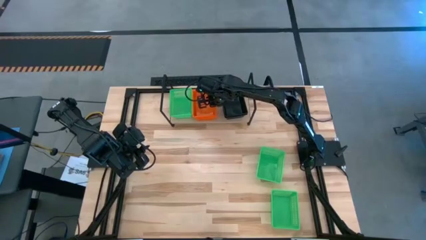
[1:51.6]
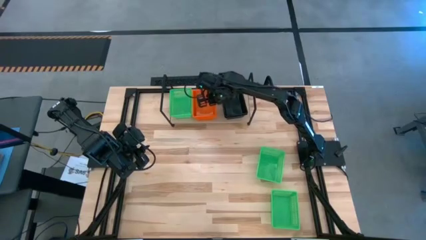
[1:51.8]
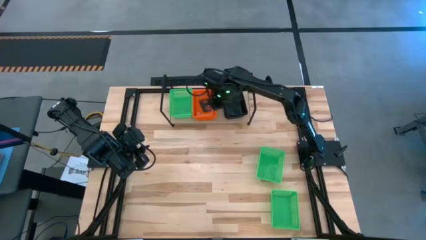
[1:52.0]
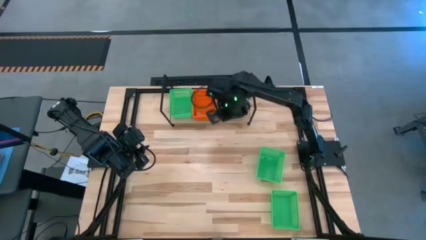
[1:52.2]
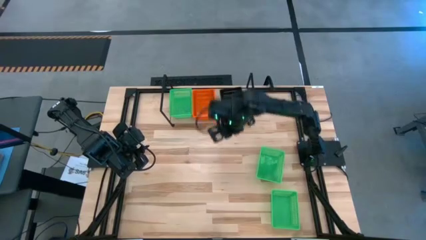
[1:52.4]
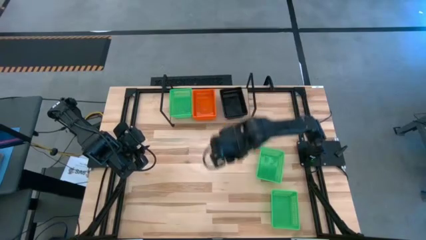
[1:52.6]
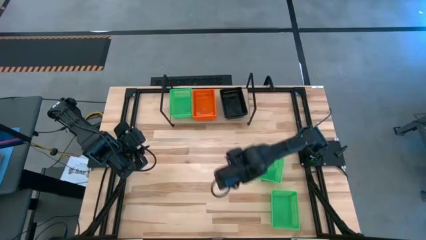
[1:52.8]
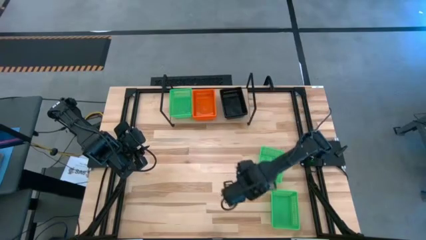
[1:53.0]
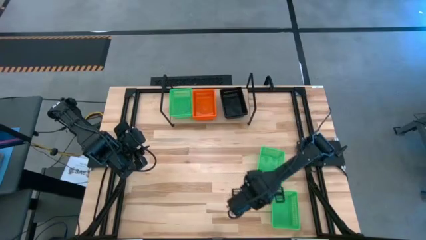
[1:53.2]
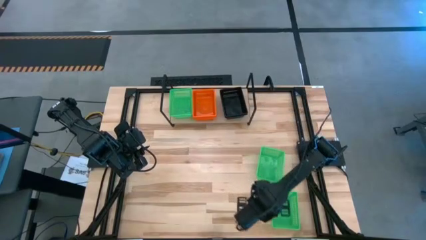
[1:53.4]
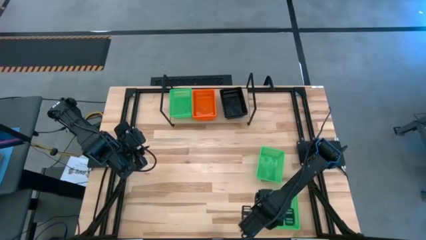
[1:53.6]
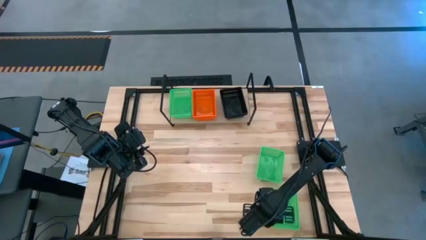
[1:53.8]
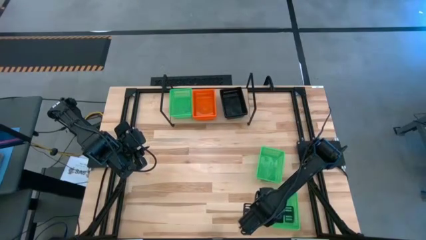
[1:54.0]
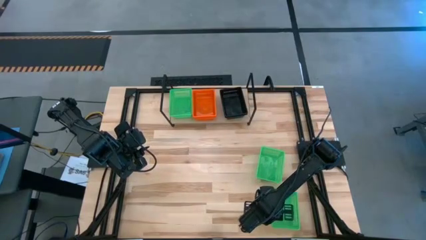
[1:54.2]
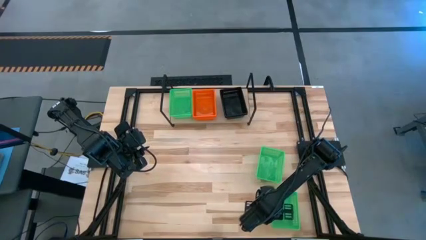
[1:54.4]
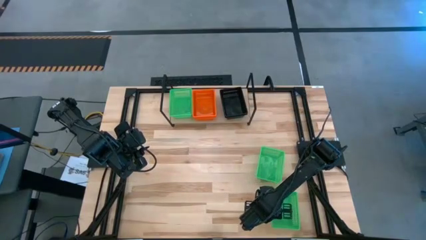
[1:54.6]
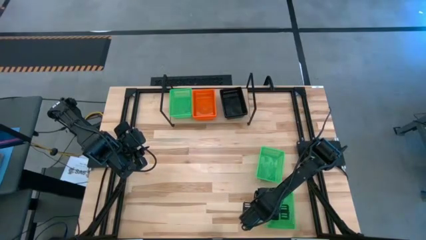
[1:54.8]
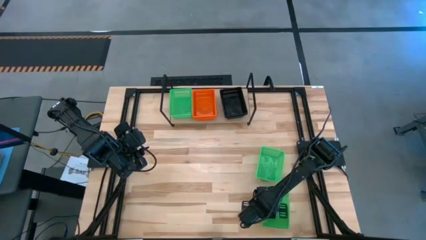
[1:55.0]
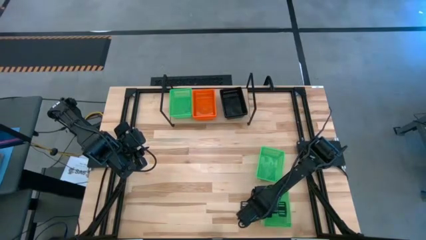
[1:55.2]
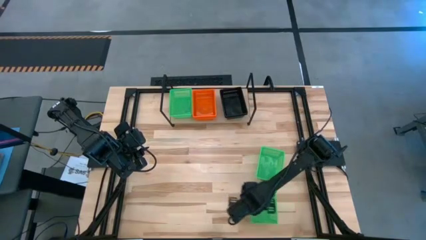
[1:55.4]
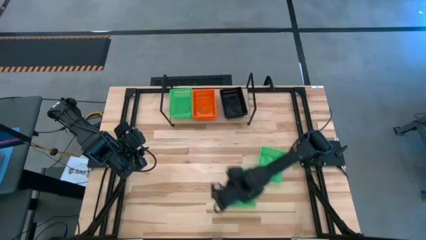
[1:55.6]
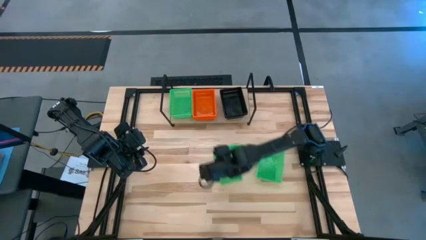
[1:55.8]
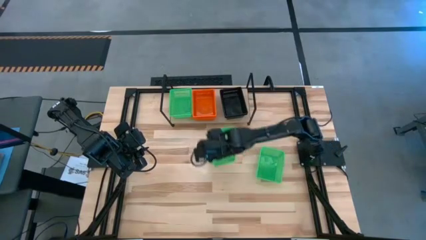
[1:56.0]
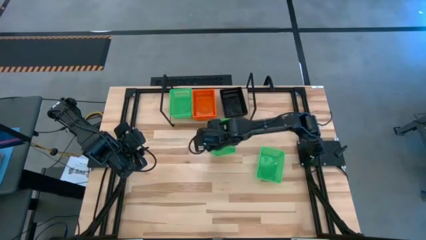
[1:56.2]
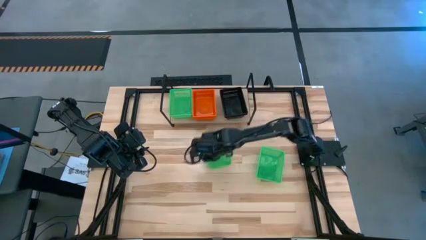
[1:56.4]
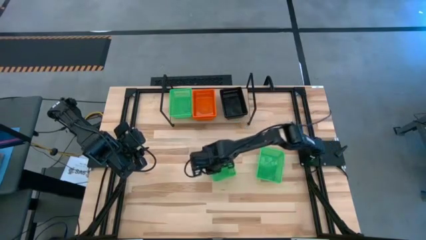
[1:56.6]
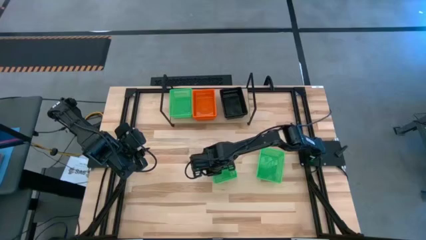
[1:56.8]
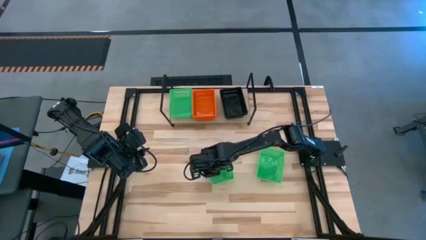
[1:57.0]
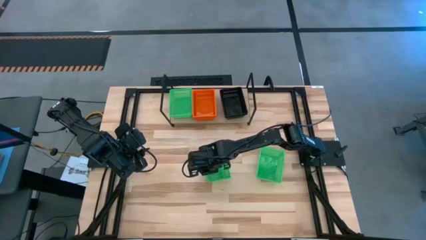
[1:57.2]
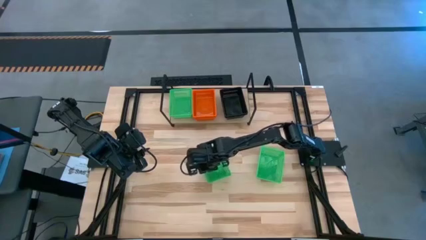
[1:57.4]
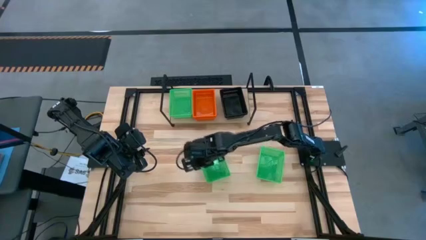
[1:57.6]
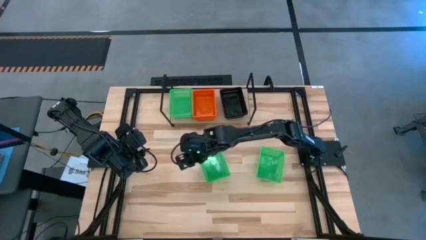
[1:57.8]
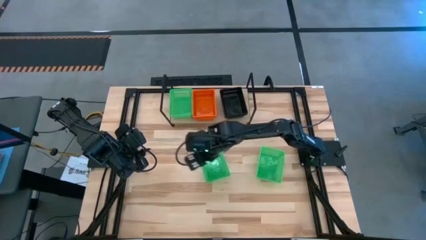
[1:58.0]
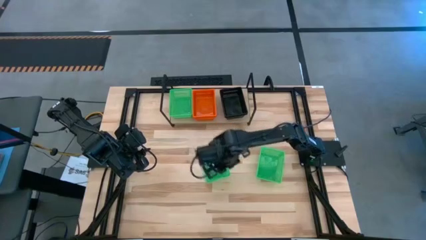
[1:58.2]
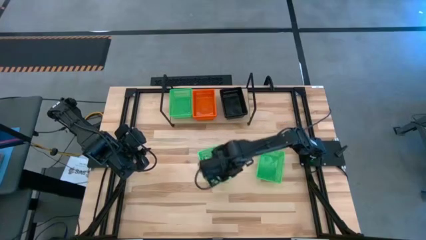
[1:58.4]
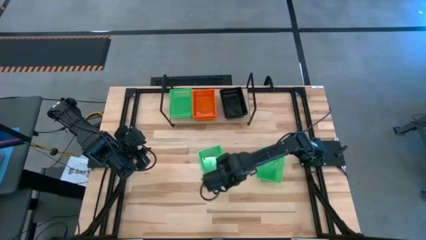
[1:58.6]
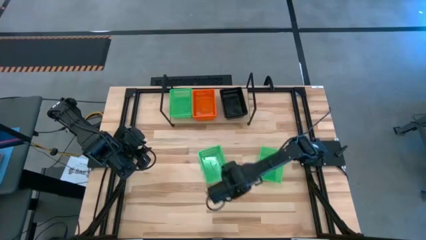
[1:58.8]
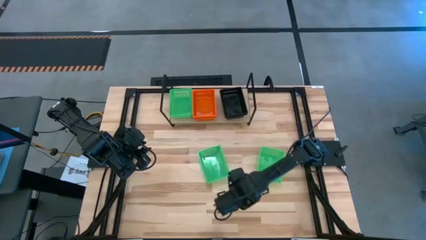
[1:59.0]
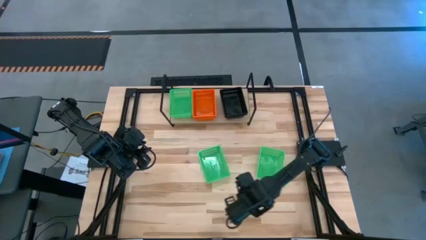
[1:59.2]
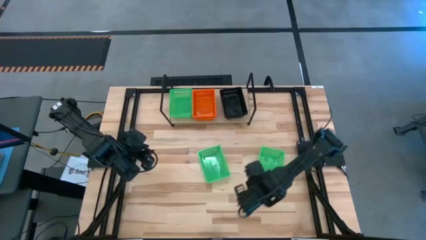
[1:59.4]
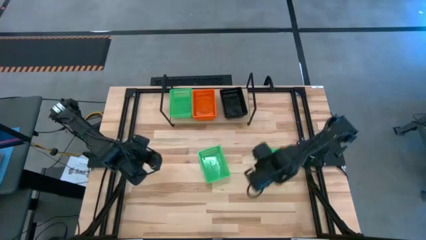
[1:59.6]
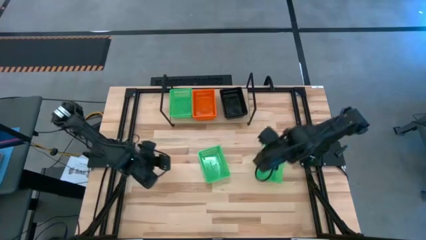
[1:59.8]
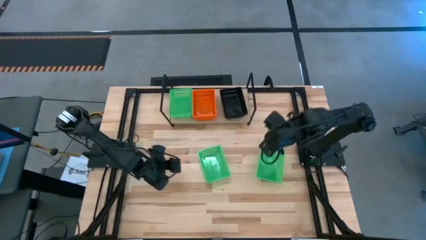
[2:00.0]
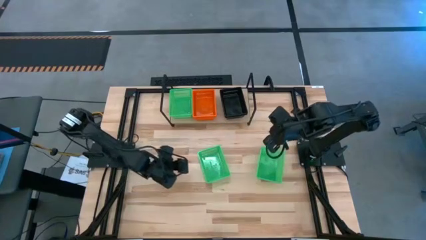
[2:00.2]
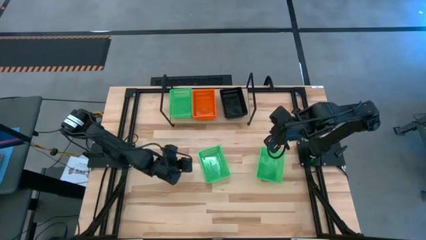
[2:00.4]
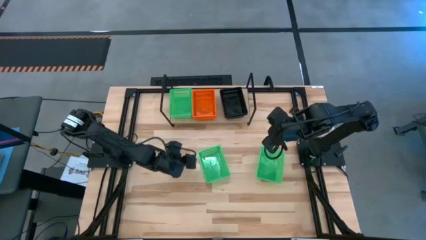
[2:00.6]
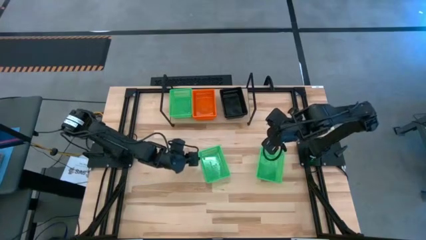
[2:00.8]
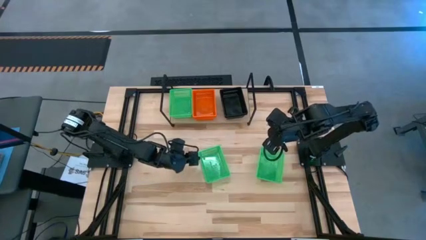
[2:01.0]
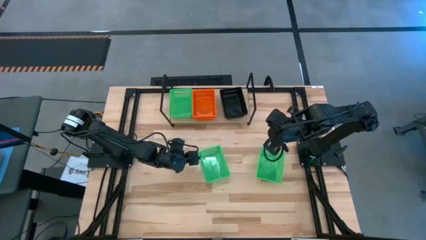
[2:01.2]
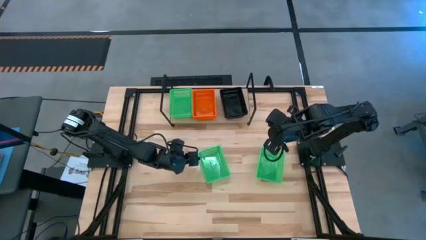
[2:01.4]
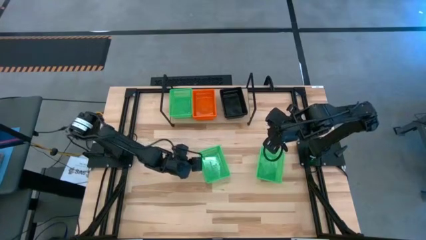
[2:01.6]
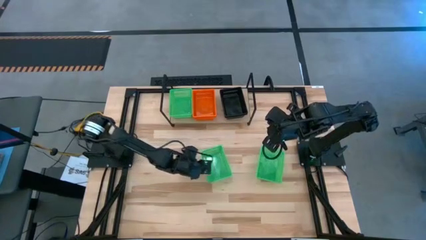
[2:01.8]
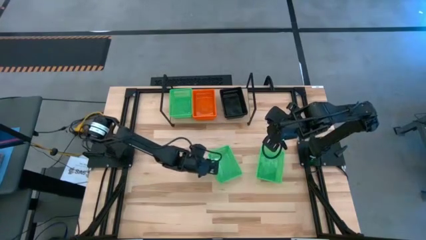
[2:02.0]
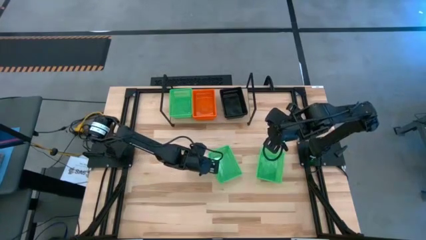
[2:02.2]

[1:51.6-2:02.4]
Task: Stack baskets on shelf by color
Stack the bottom green bin on top of the green bin on the shelf

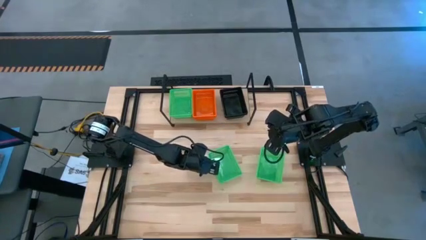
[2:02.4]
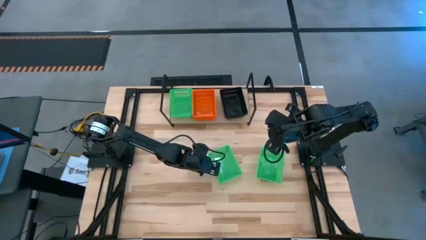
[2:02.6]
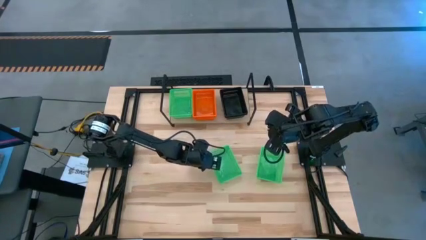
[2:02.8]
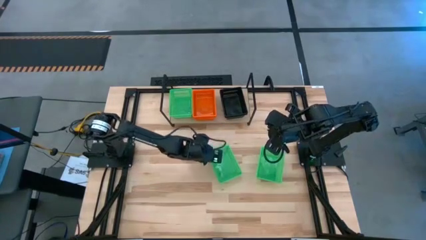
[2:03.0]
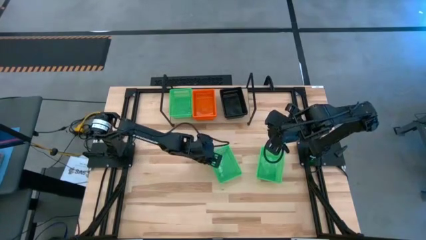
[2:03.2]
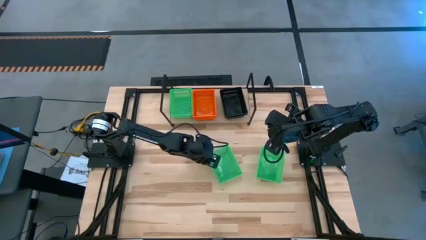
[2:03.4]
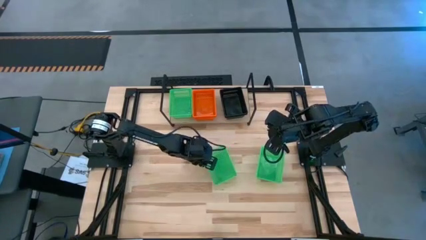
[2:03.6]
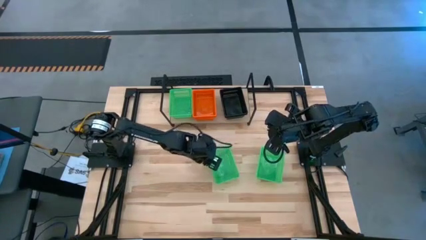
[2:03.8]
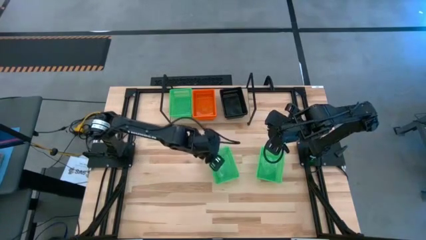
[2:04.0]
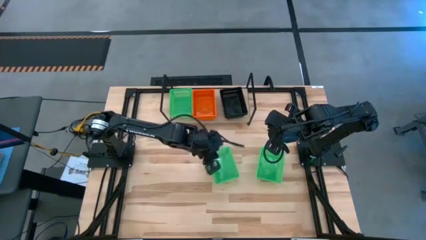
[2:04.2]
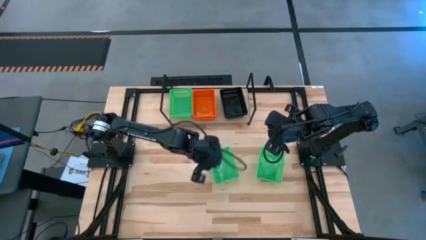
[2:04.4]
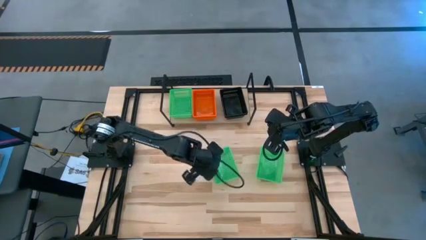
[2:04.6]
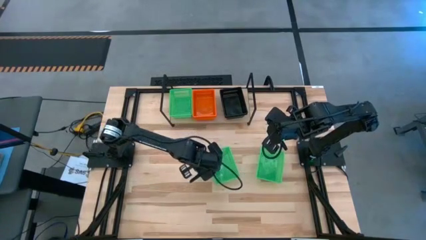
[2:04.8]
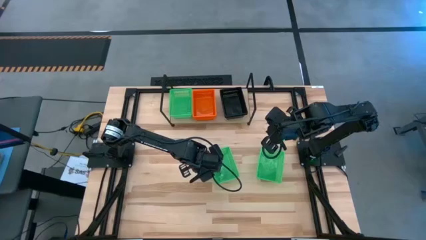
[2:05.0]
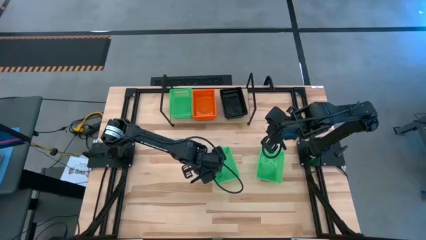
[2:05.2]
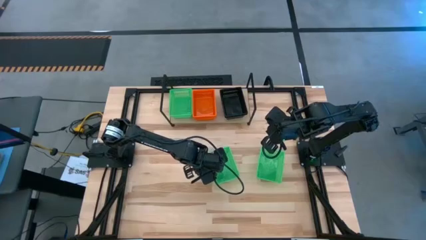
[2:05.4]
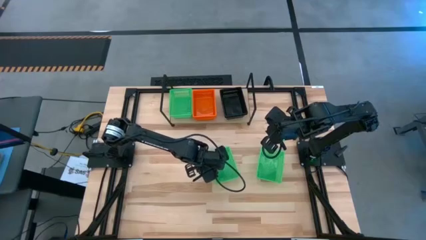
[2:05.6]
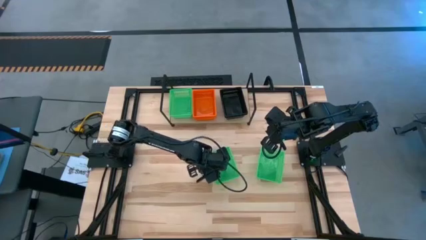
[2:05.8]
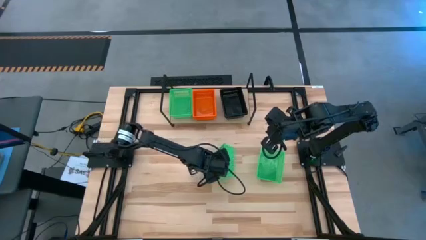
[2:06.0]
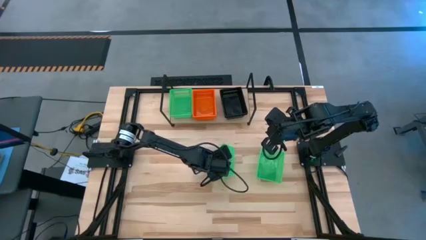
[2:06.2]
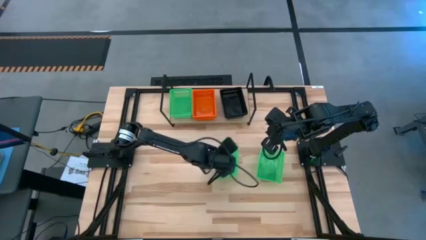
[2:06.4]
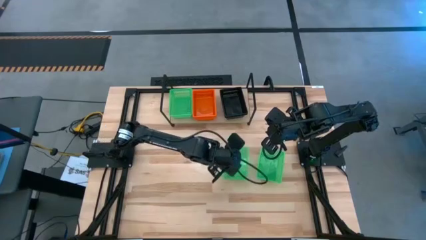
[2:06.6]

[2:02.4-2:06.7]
Adjust the left green bin on the table
